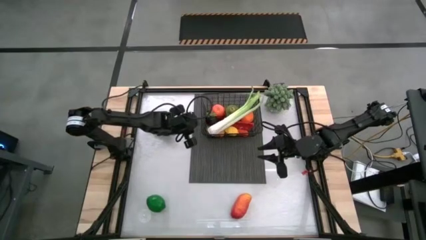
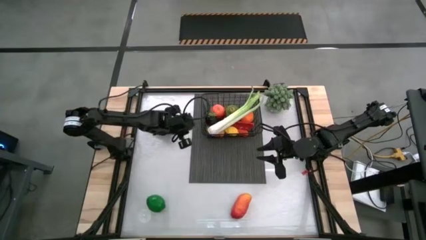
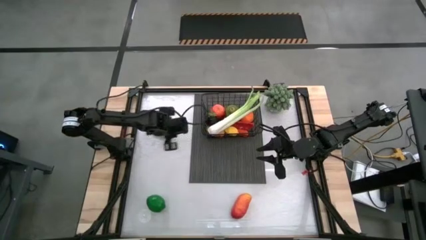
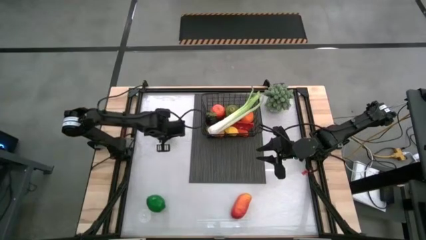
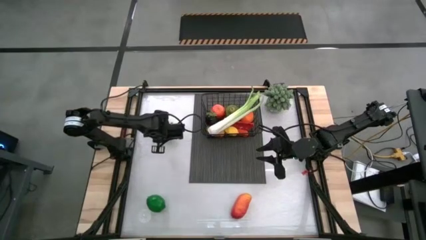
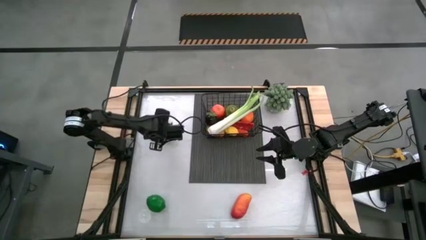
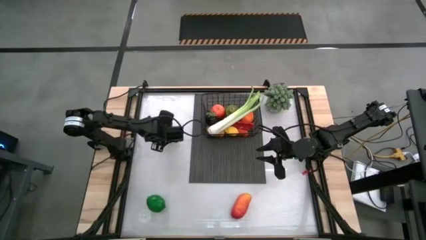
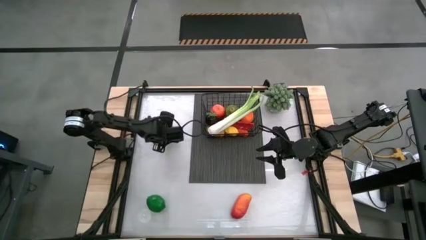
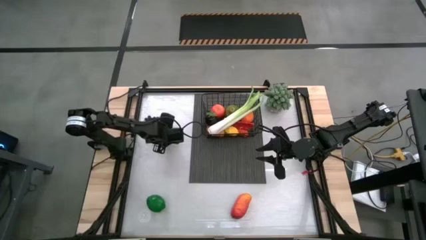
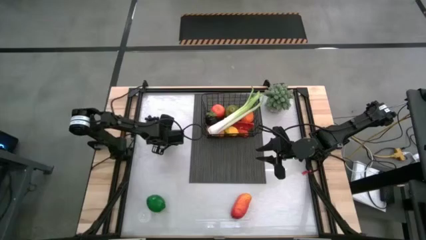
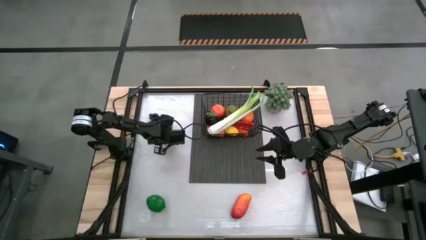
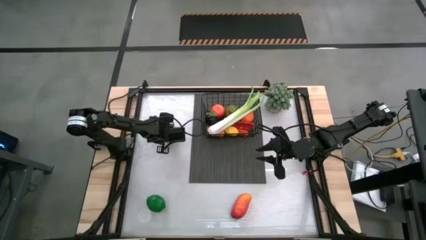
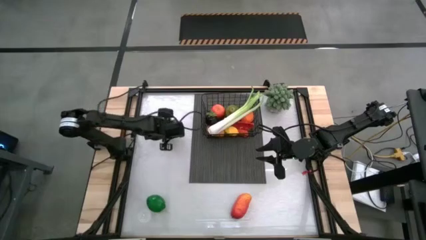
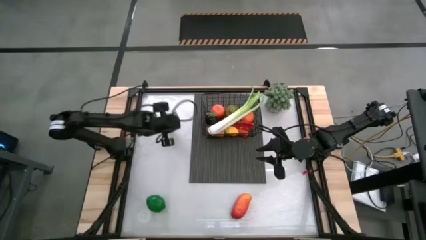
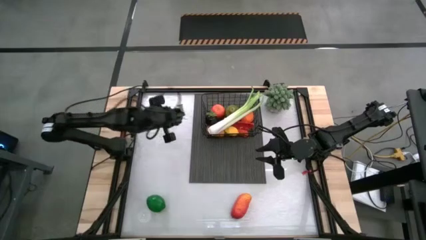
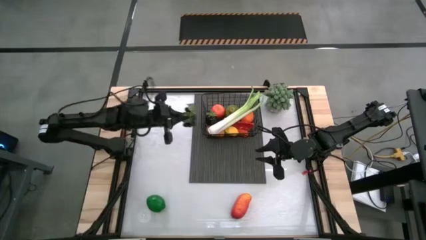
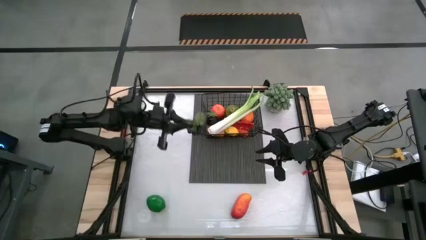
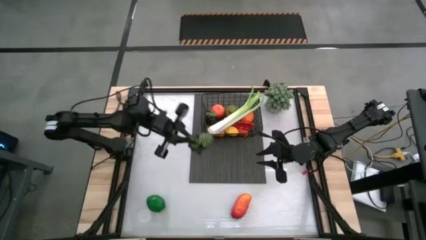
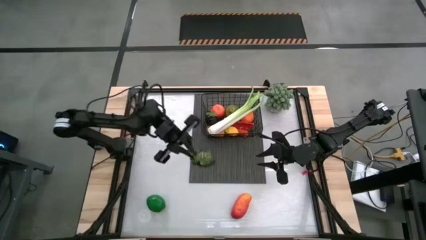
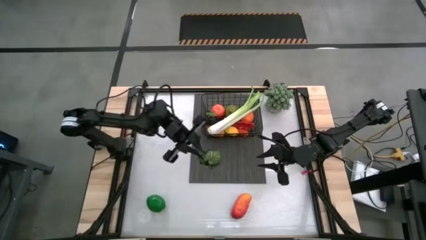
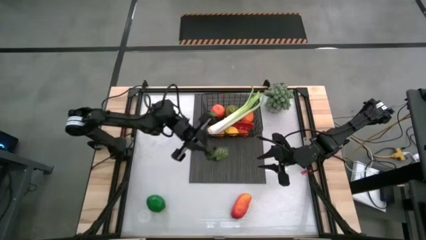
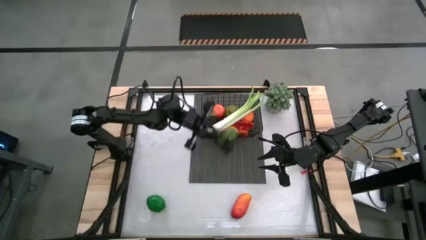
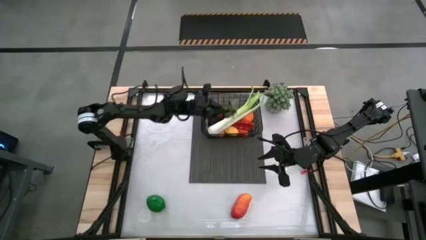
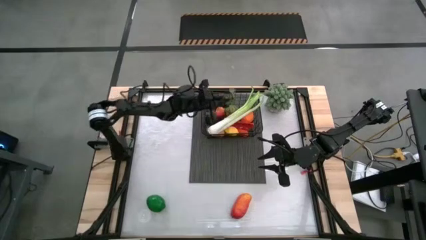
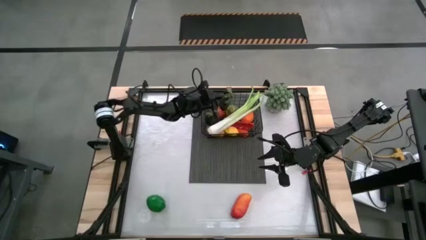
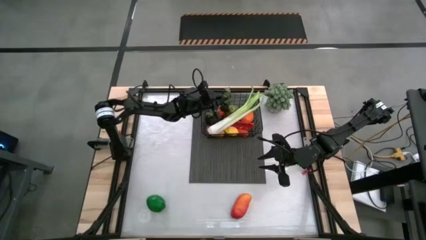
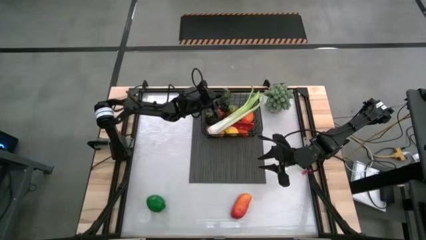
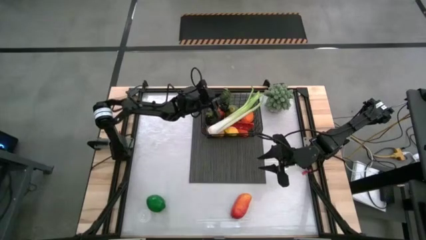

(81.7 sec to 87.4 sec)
Task: Build produce basket
Put the grapes into the wire basket

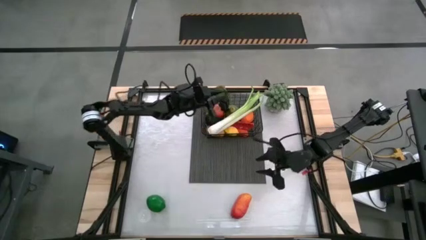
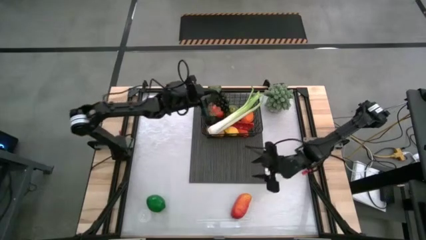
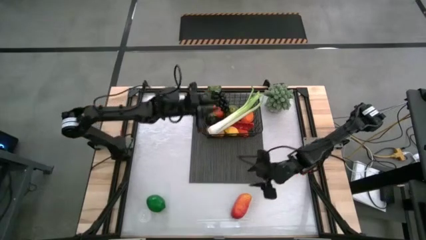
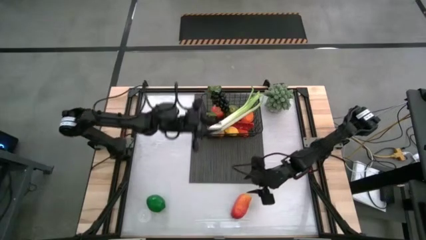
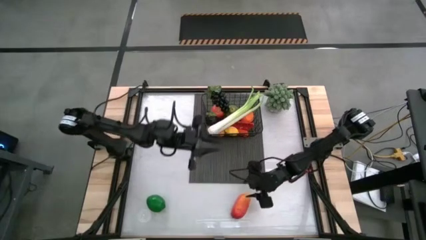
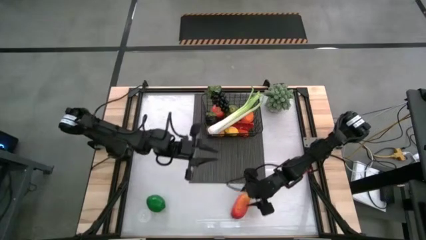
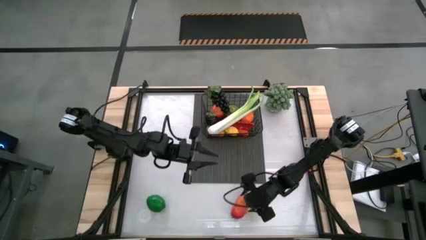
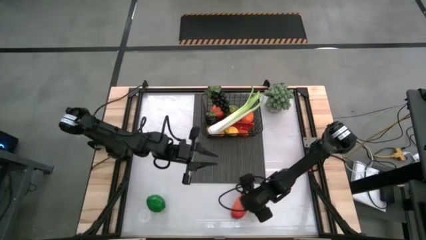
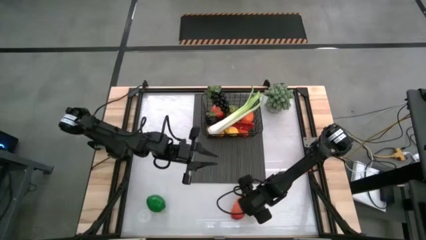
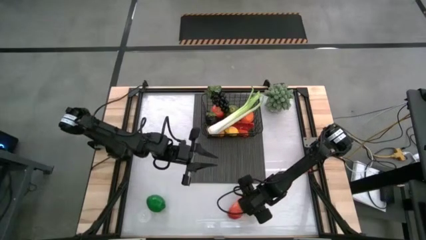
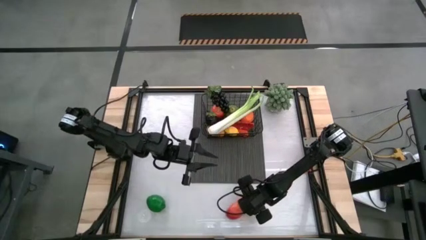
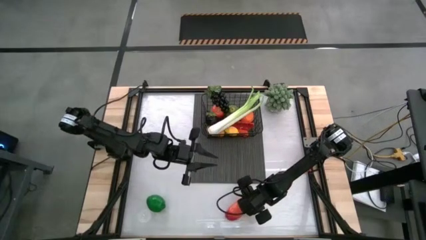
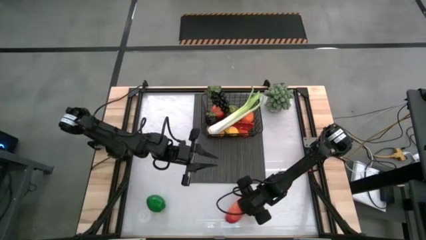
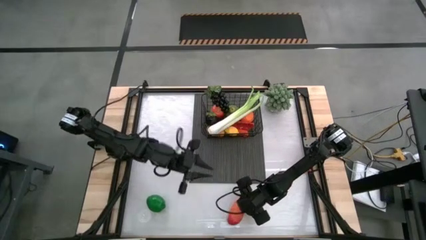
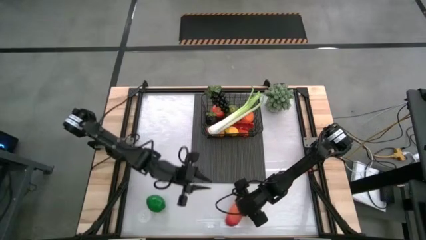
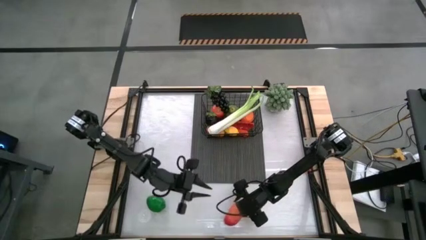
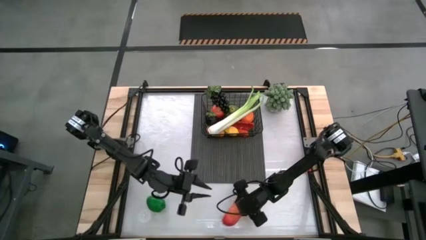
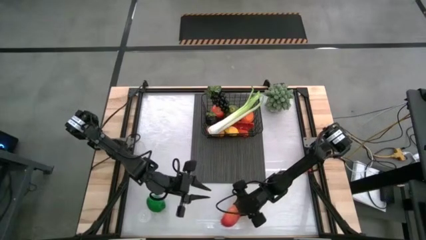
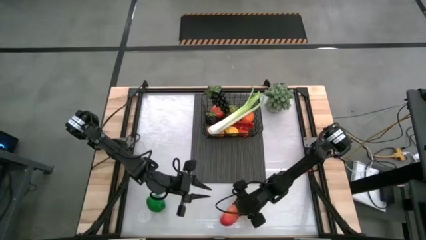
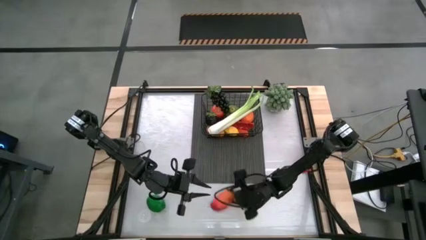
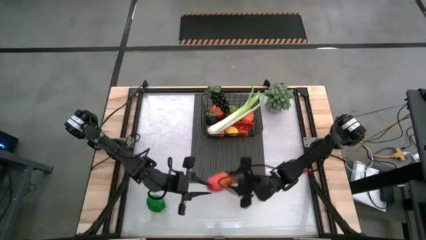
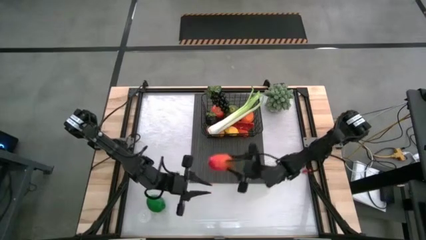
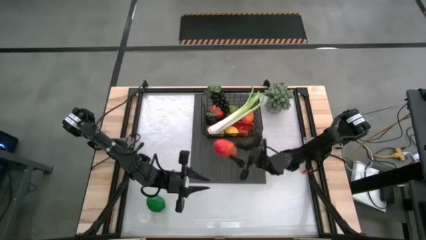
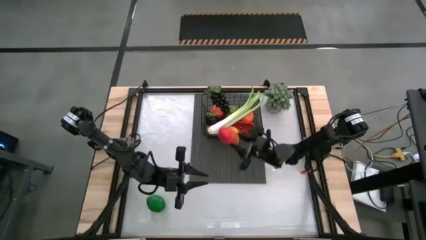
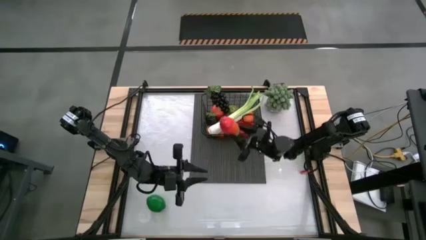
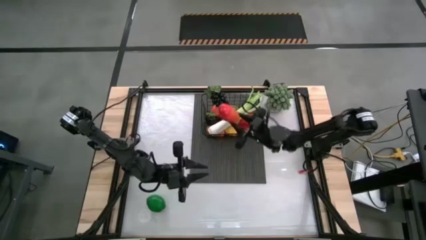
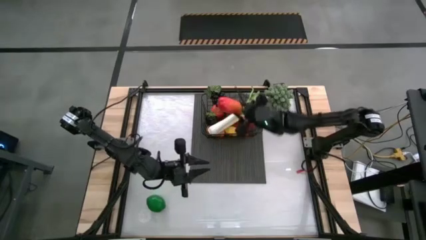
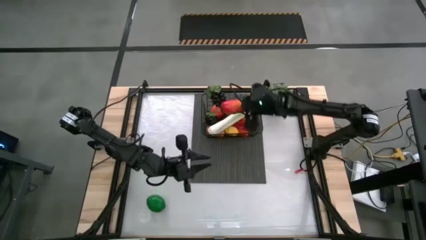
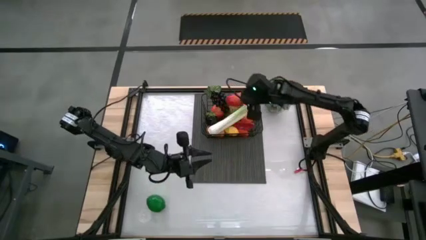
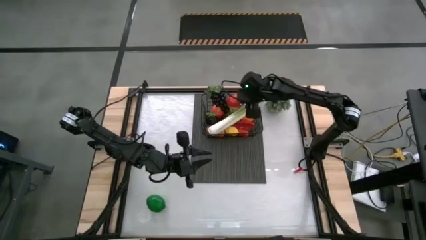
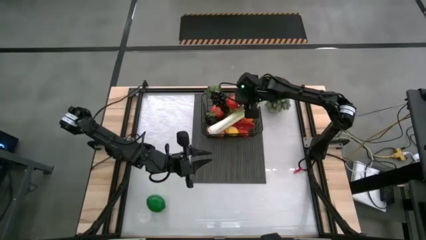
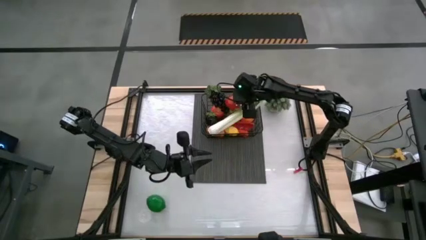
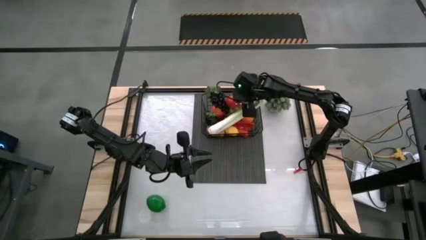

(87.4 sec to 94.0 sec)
Put the mango into the wire basket

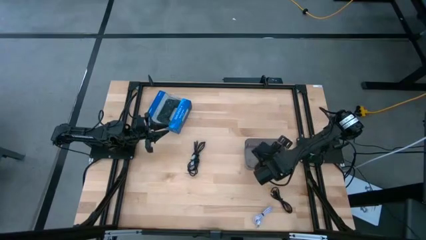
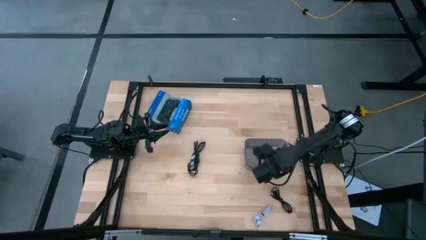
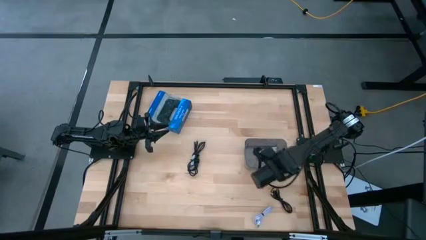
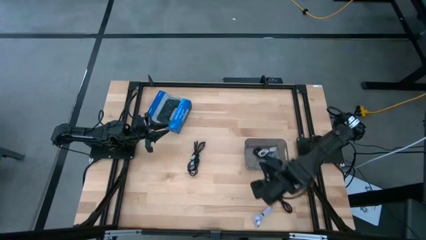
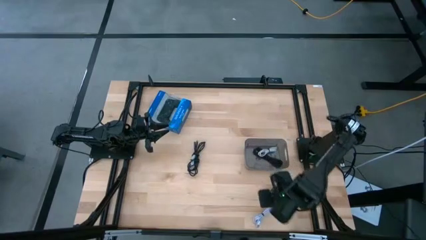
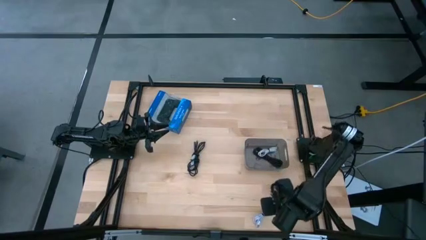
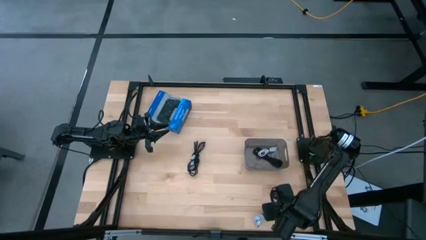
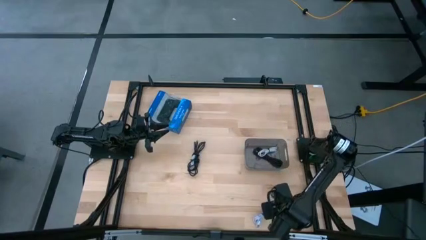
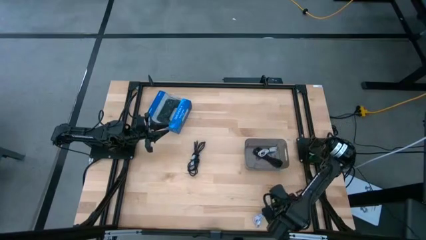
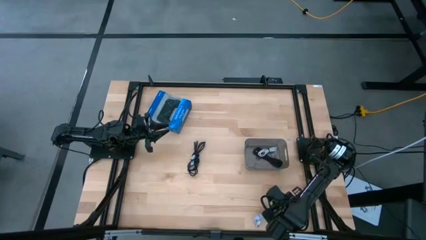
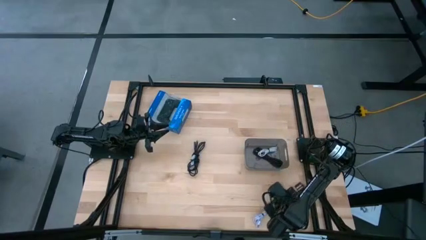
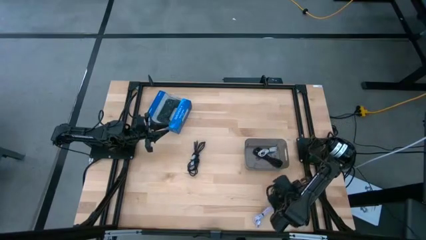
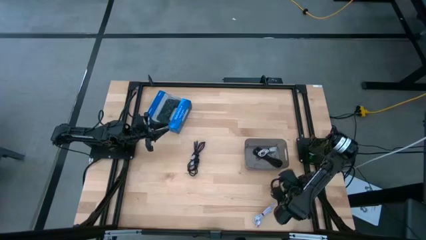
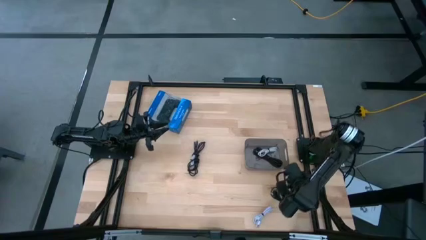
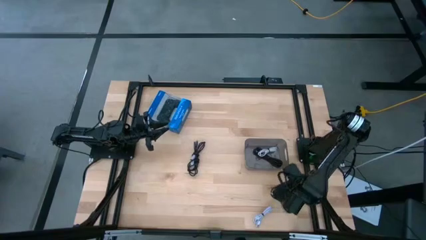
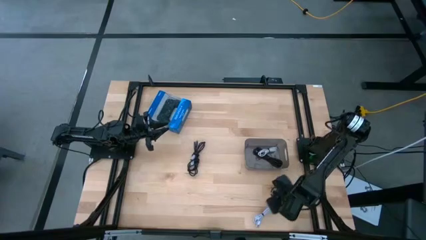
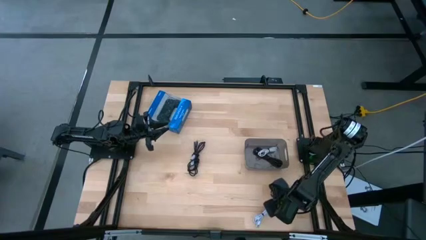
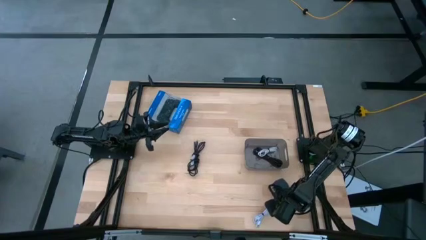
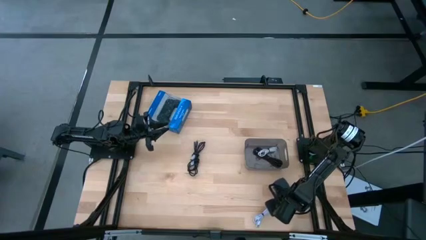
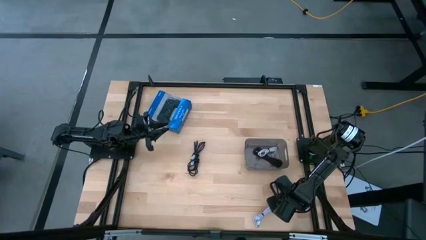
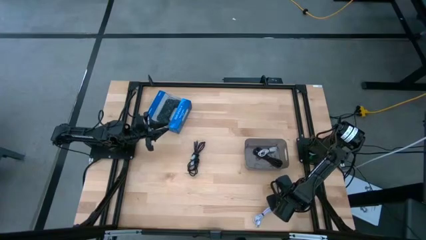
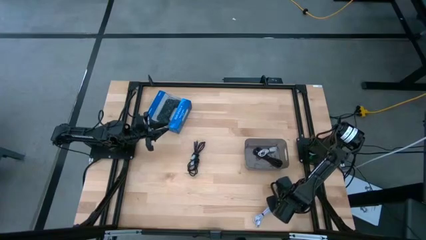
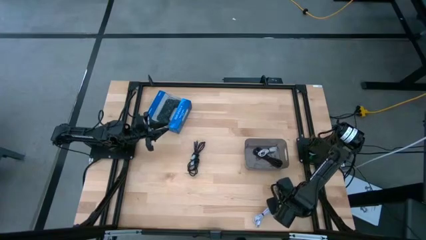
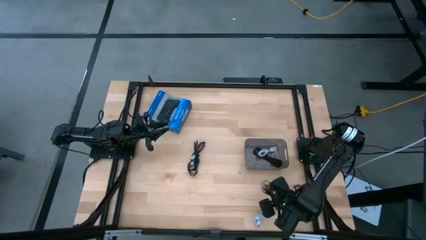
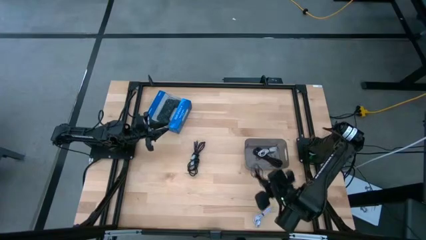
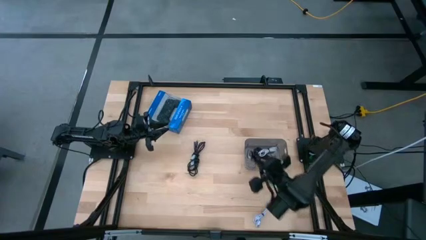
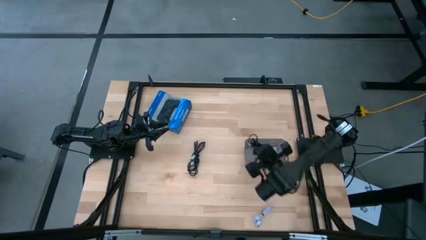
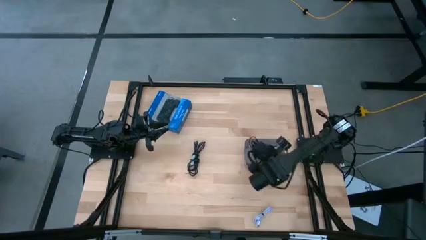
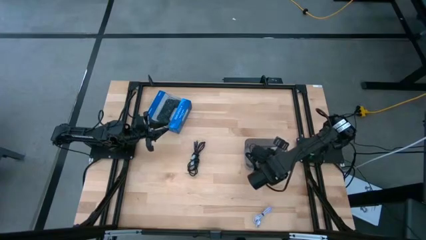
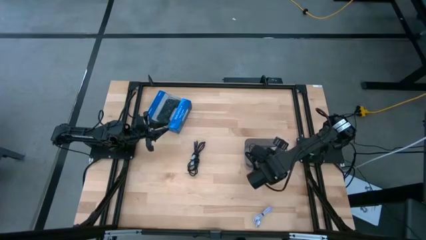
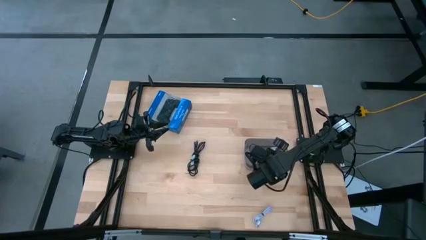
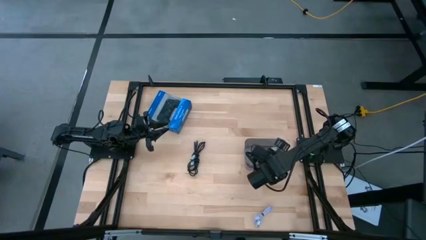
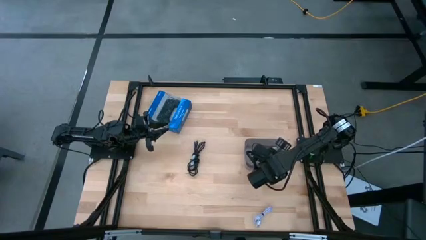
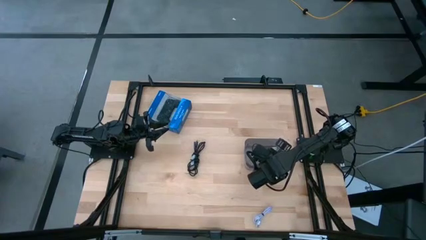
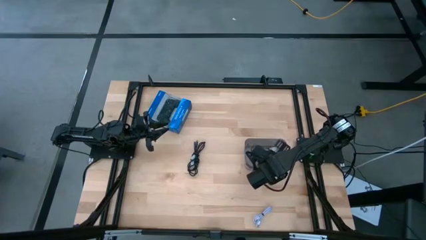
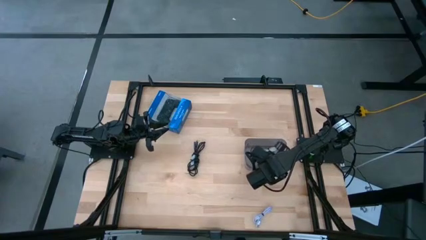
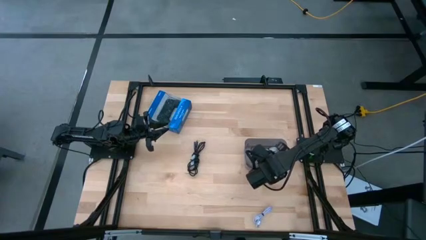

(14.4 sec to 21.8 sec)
Task: Pick and place USB-C Cables
Put the right black charger cable into the black bin
